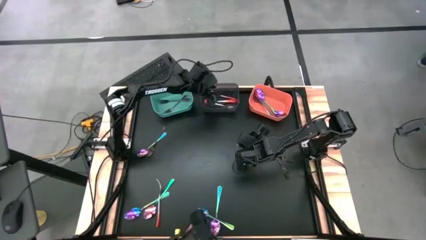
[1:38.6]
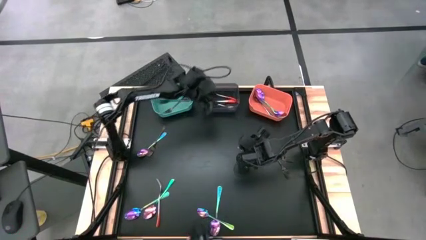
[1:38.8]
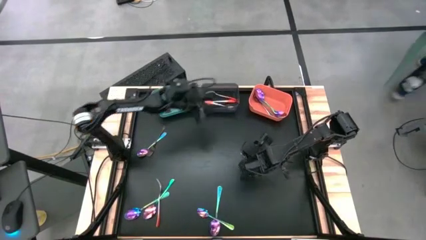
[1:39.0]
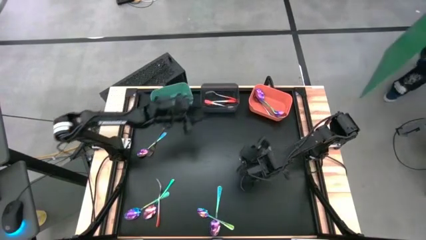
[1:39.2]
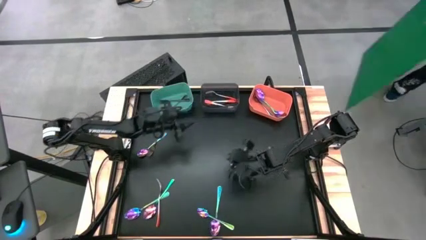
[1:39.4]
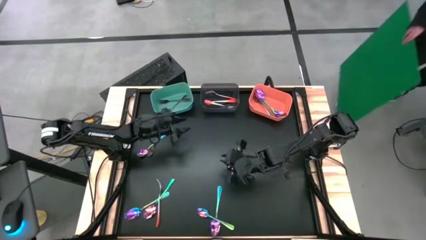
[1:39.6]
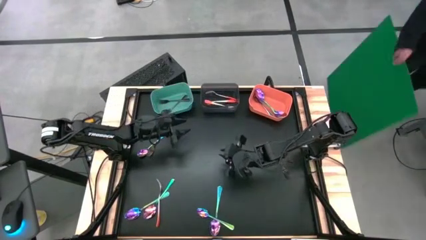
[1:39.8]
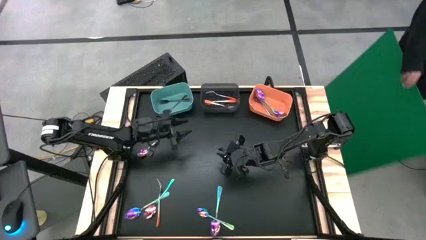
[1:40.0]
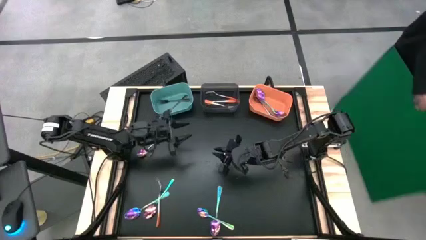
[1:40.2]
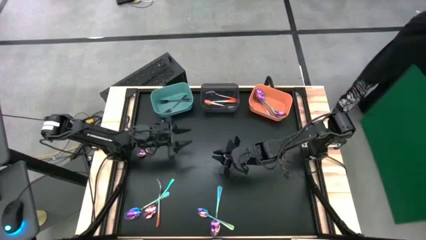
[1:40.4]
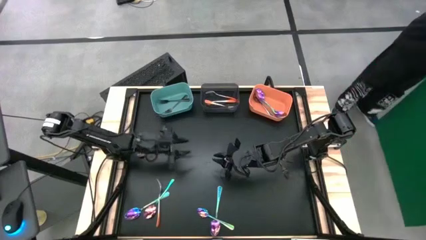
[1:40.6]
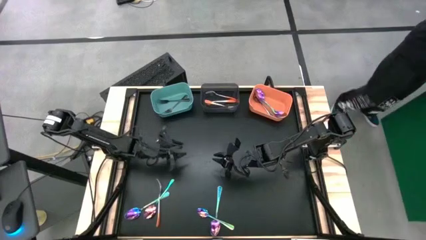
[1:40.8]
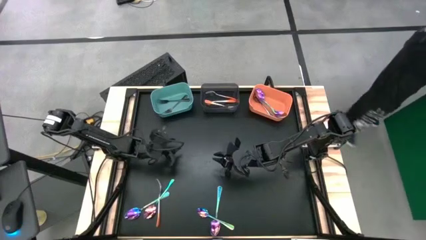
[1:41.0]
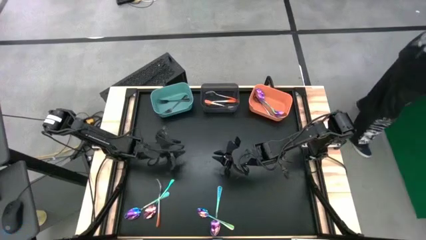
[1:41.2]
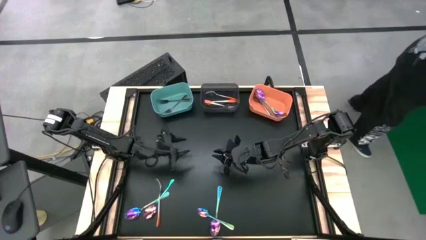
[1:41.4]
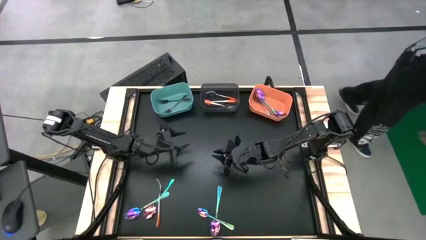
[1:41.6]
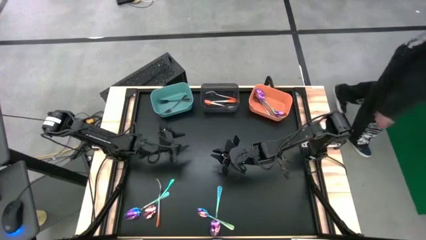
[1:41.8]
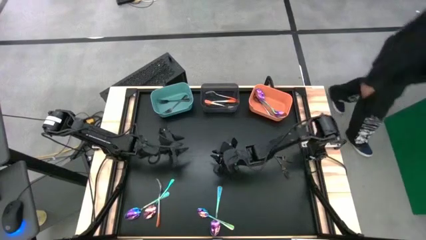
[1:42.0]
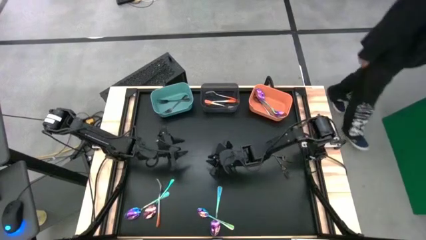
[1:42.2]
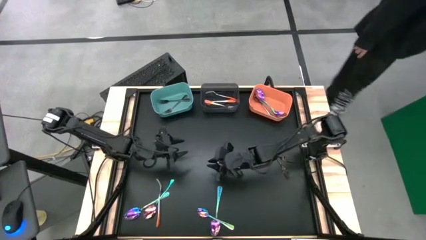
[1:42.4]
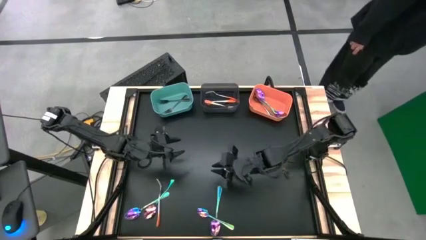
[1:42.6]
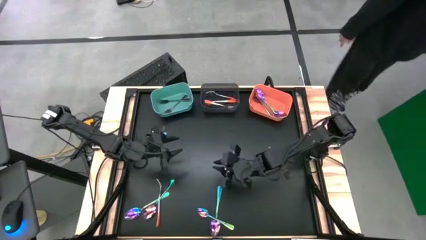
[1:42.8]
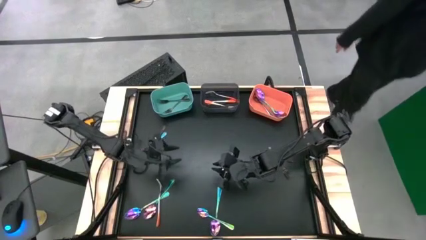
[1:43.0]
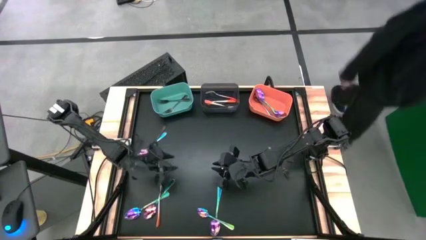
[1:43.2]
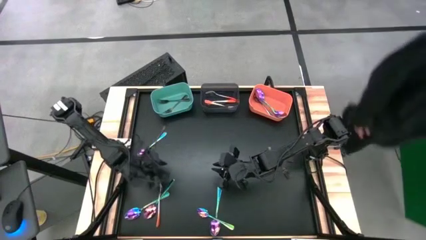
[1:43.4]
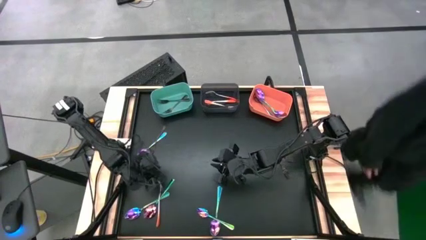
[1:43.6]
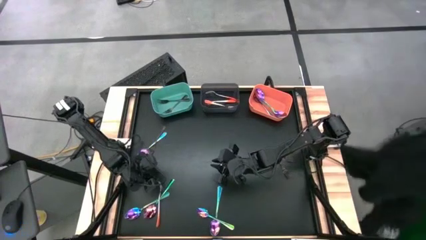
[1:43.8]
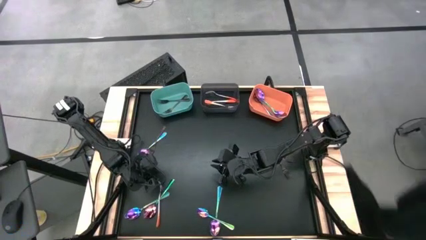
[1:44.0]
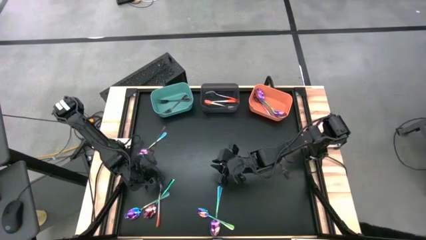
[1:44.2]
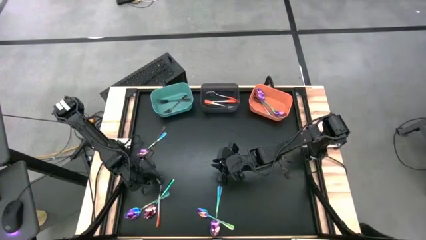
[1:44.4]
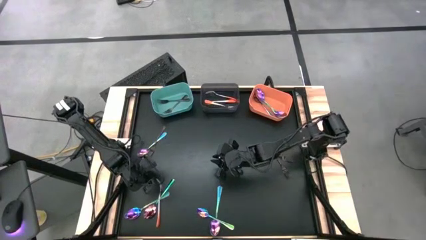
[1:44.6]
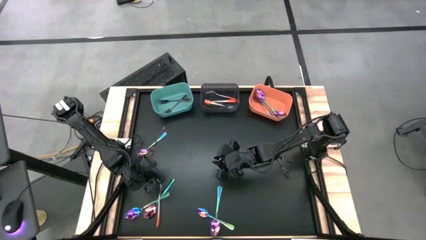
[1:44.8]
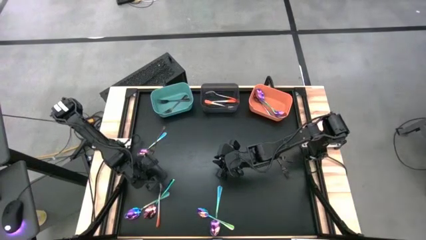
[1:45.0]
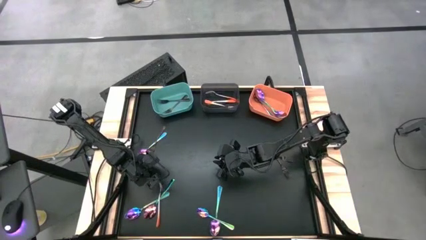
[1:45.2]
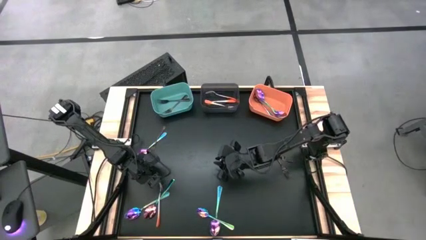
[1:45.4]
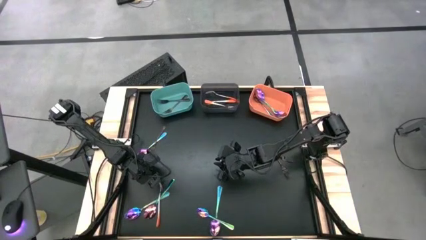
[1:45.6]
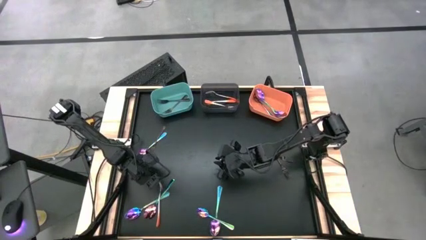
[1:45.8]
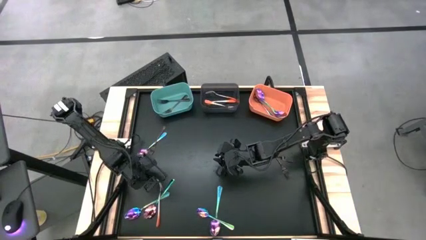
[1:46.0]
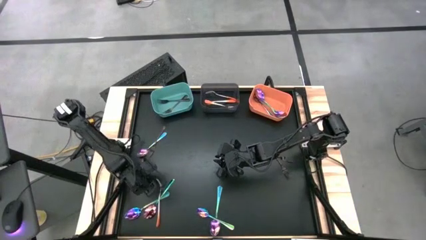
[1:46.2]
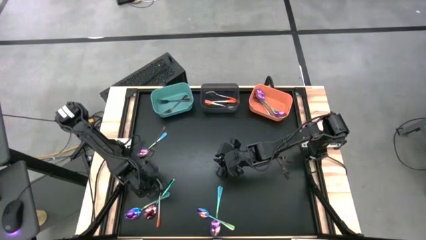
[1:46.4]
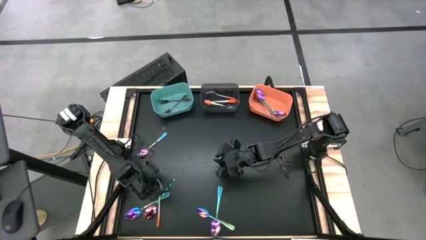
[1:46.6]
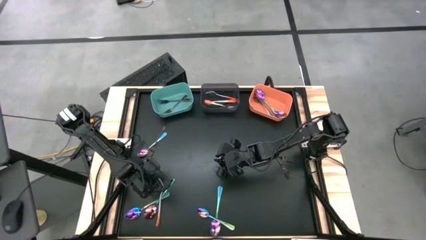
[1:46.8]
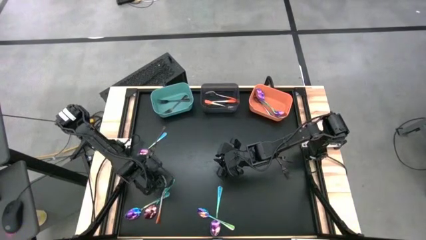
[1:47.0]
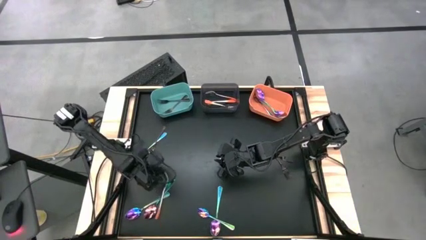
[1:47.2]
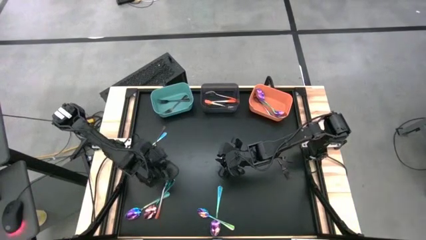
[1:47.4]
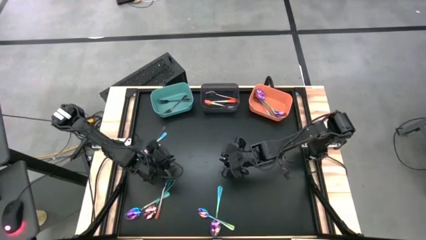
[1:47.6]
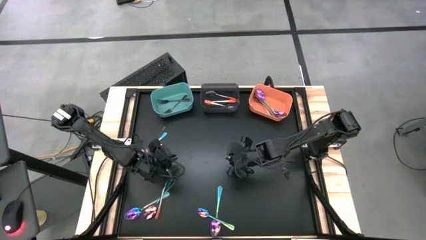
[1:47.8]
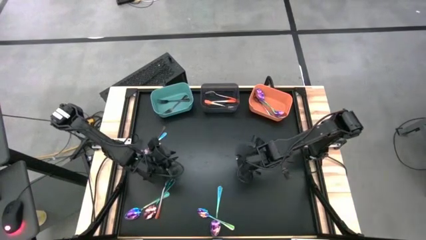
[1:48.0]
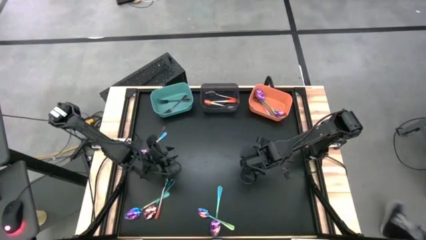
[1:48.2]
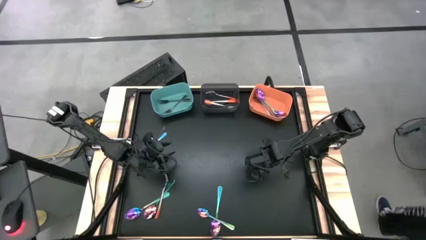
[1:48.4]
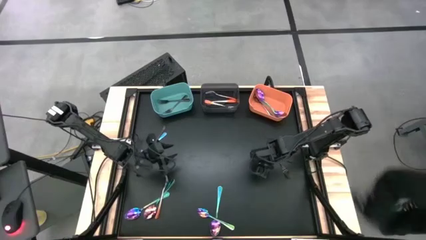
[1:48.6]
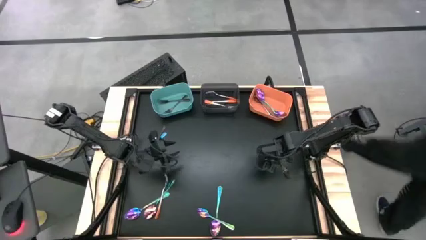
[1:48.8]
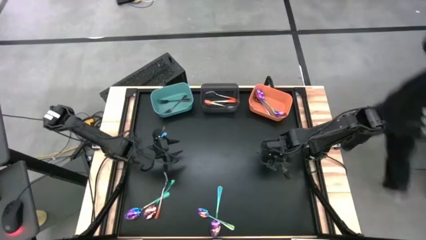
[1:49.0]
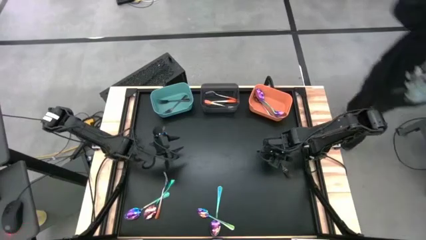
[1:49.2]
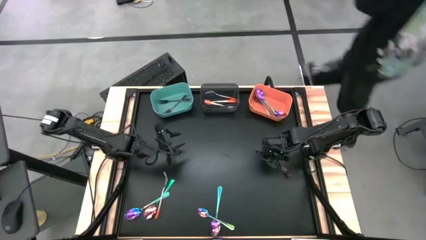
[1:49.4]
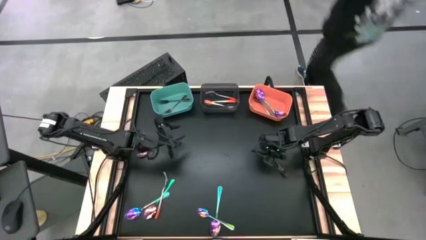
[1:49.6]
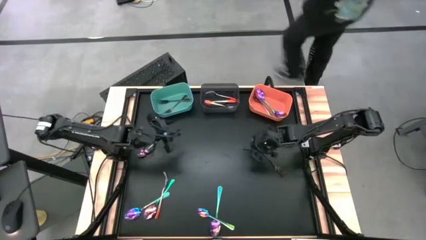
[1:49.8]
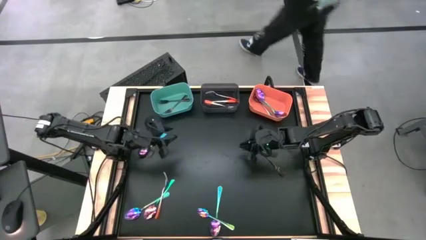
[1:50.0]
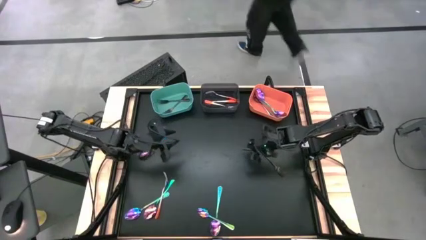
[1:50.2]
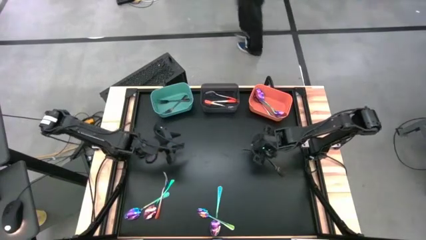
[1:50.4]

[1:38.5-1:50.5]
Task: Sort silverware by color (type)
Put the black fork into the green bin

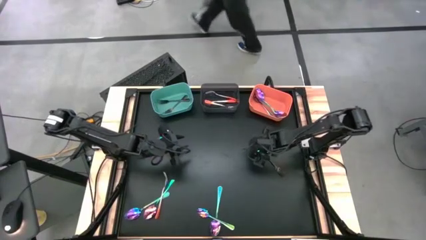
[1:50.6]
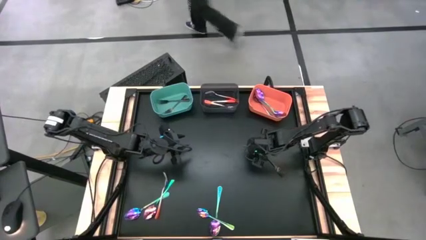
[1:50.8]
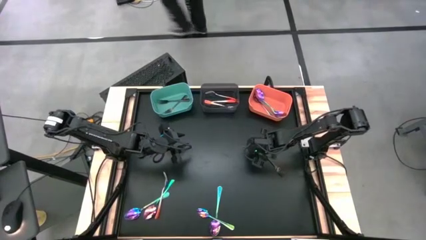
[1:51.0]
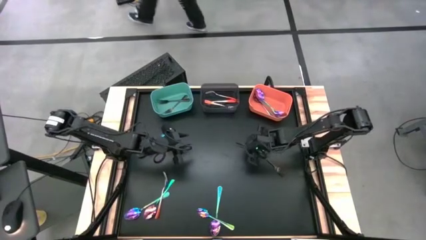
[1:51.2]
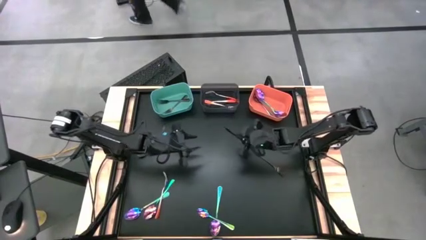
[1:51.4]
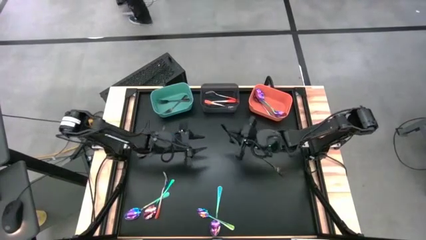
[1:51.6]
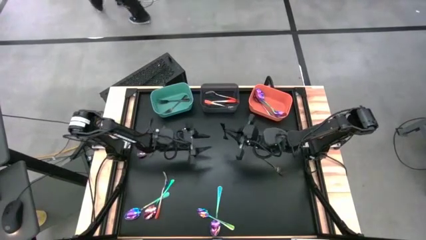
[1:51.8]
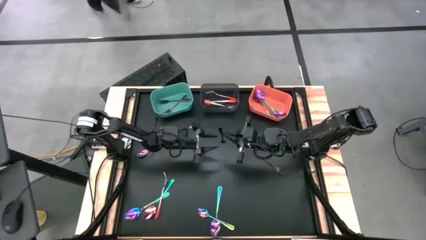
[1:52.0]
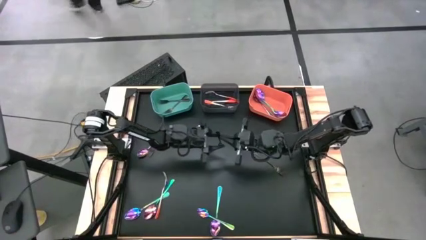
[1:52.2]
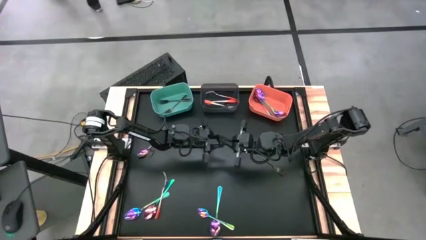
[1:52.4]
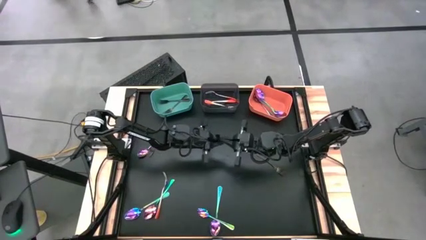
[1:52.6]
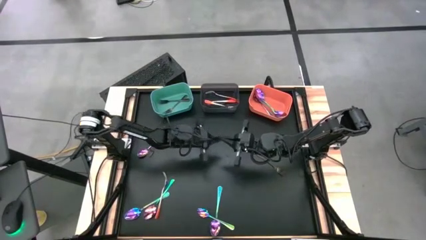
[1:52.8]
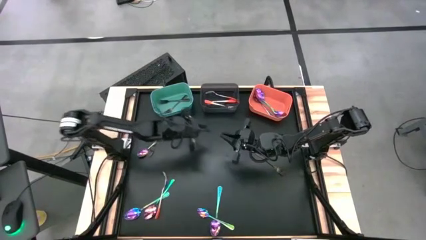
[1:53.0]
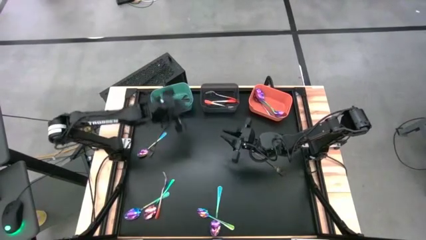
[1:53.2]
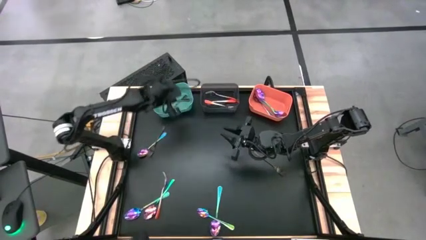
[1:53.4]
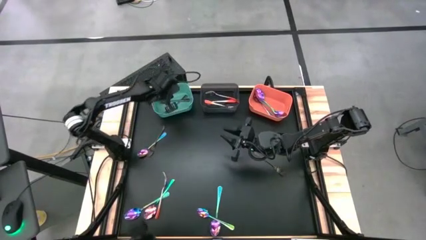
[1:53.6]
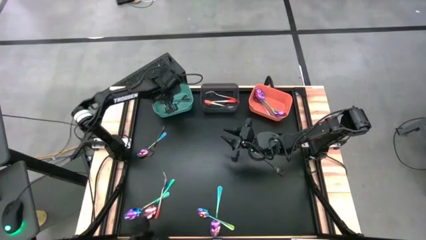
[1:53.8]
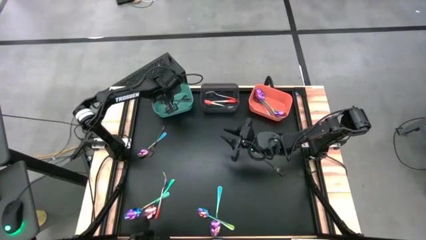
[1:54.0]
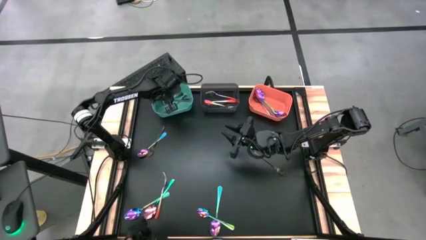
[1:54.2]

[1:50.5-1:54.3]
Put the black fork into the green bin

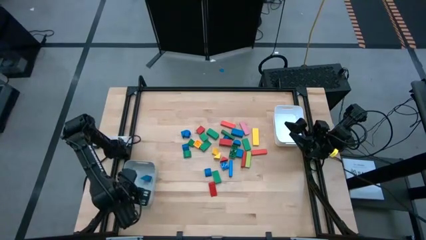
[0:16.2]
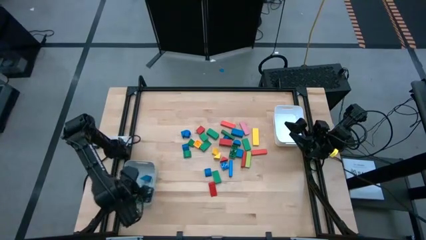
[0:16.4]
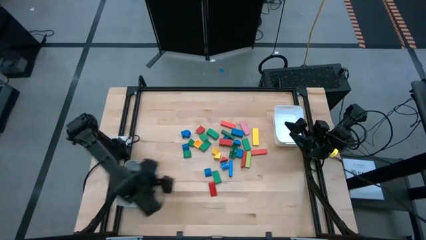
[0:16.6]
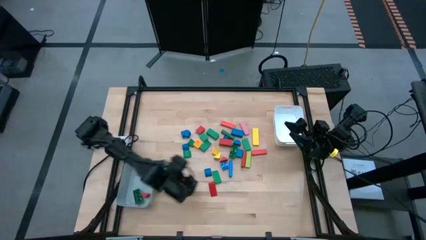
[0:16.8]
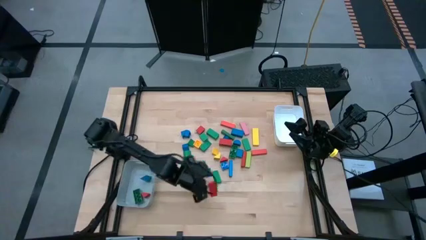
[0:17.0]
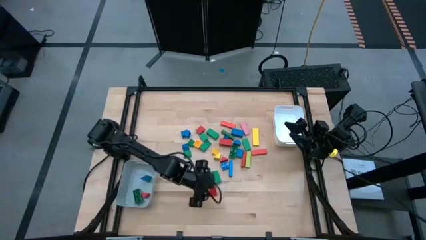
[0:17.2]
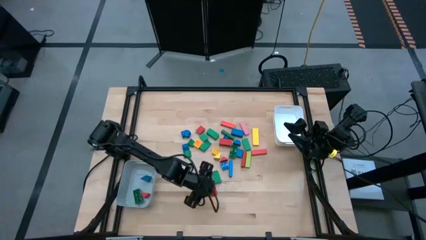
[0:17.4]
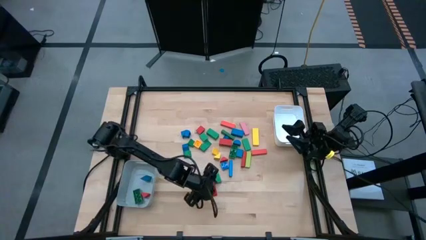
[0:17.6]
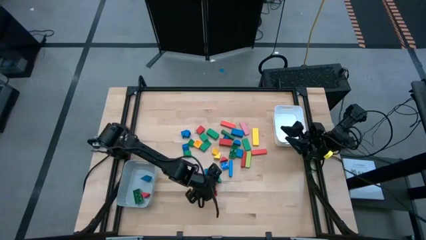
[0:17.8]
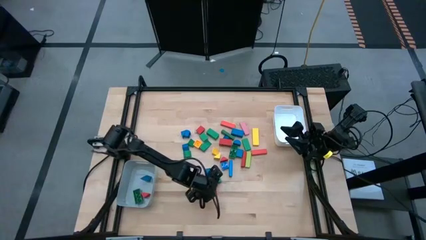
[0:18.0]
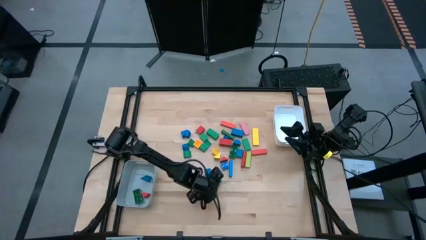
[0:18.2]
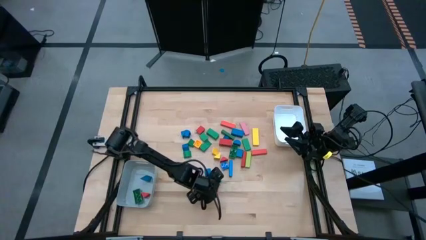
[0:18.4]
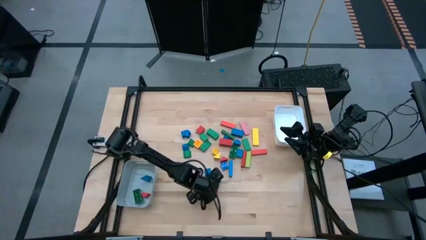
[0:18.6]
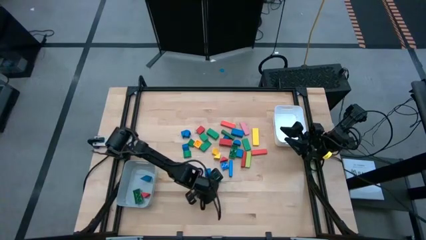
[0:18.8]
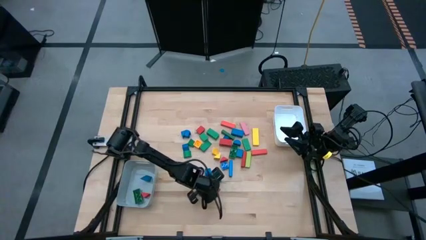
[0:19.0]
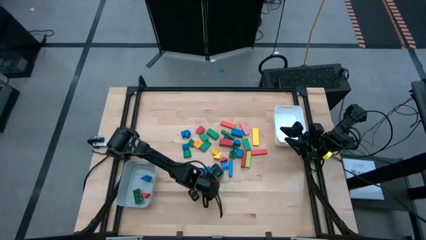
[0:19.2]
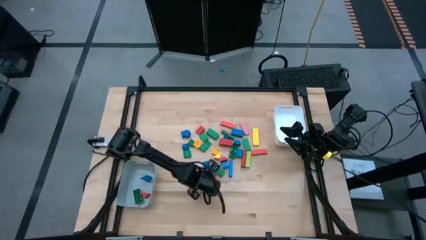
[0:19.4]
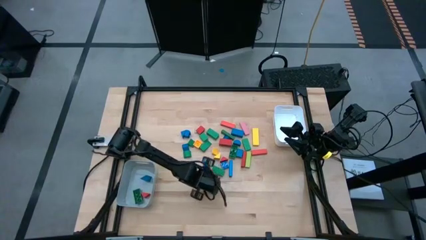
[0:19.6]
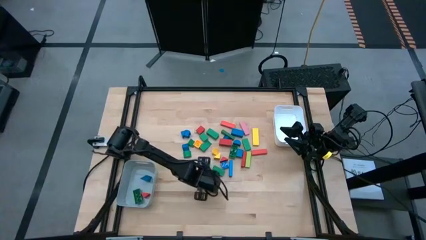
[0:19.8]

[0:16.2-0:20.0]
Task: Sort blocks by size
Put the orange triangle block into the gray bin
